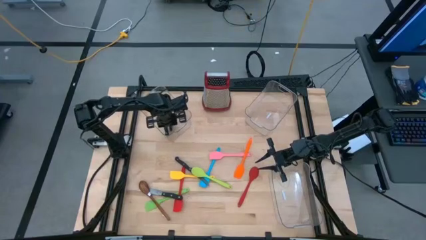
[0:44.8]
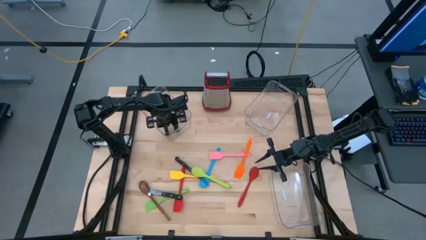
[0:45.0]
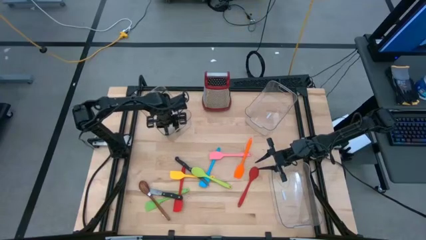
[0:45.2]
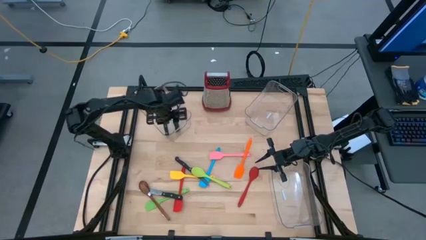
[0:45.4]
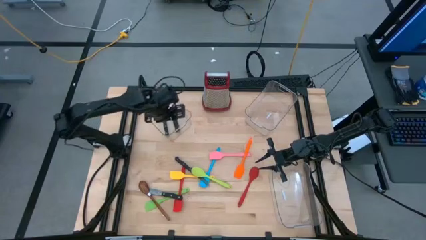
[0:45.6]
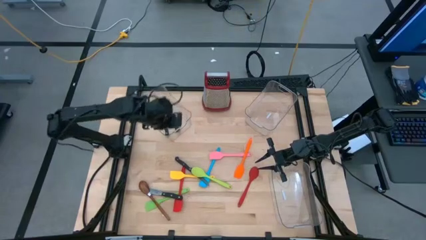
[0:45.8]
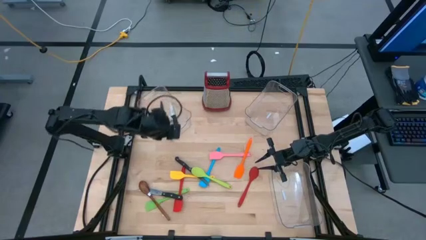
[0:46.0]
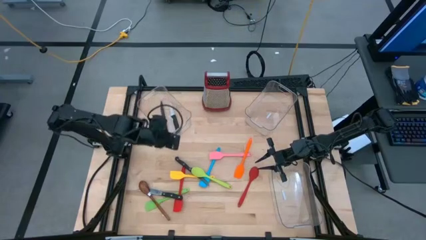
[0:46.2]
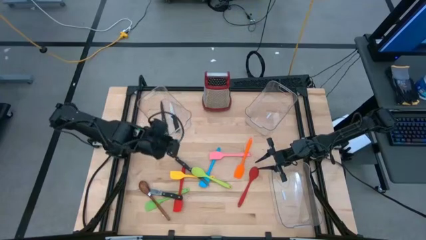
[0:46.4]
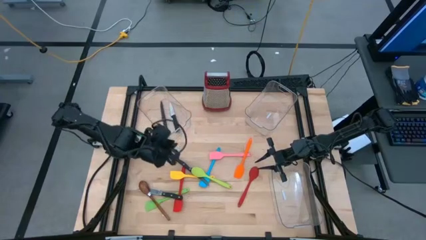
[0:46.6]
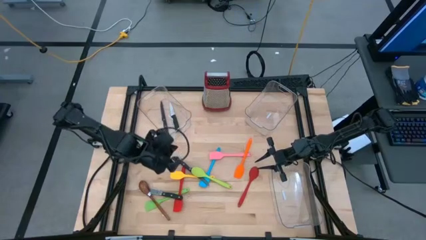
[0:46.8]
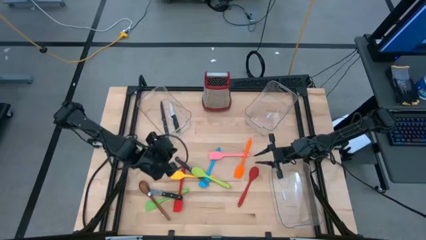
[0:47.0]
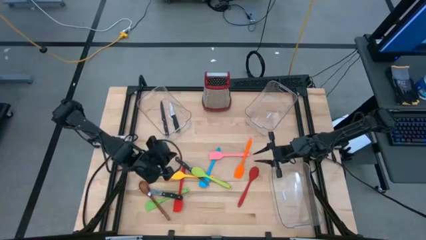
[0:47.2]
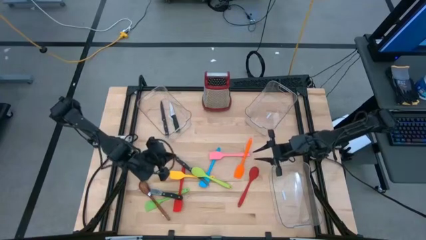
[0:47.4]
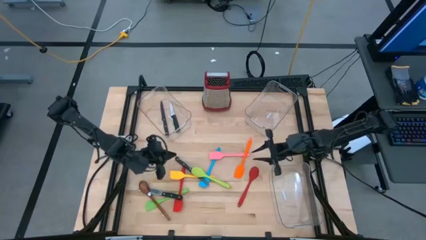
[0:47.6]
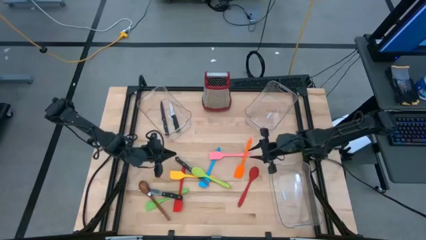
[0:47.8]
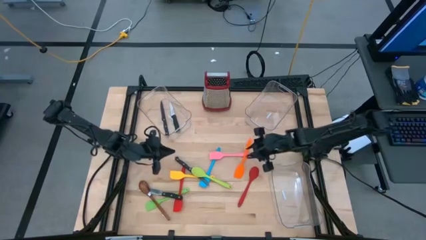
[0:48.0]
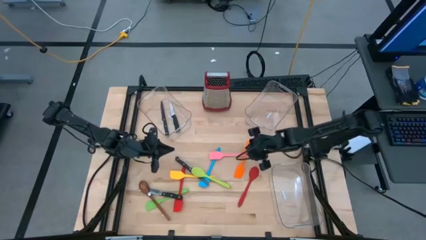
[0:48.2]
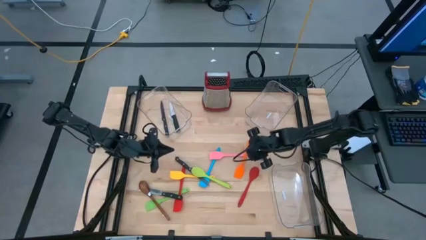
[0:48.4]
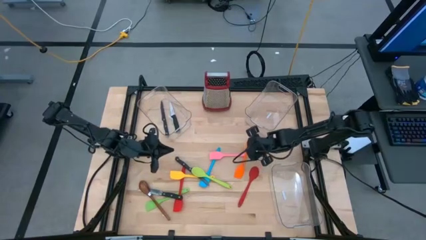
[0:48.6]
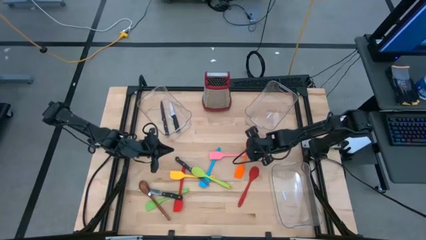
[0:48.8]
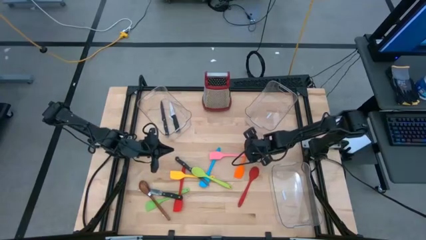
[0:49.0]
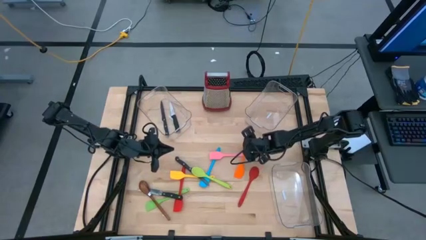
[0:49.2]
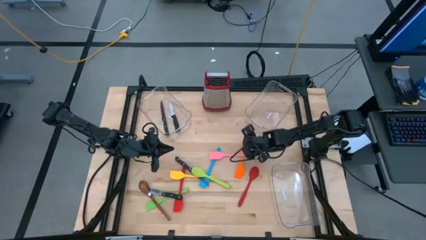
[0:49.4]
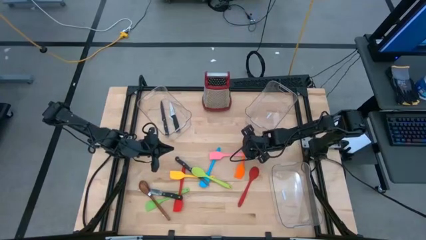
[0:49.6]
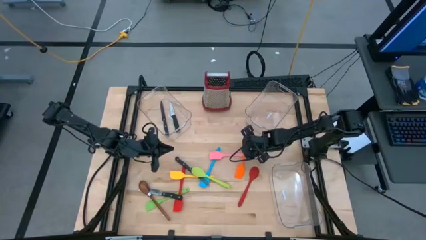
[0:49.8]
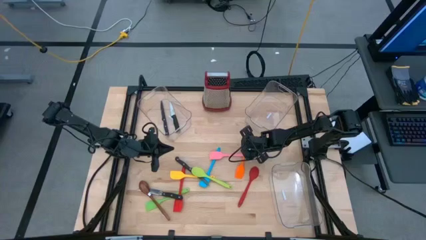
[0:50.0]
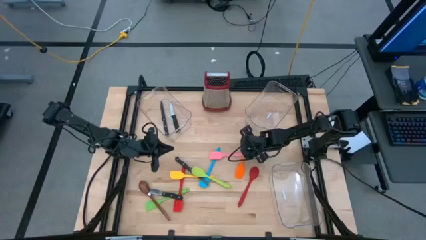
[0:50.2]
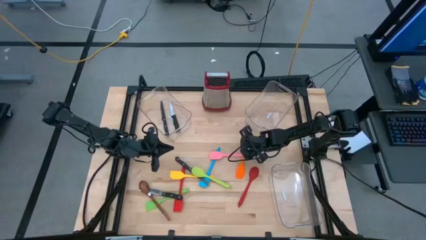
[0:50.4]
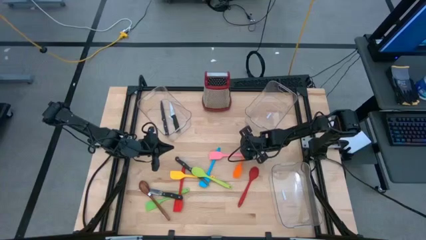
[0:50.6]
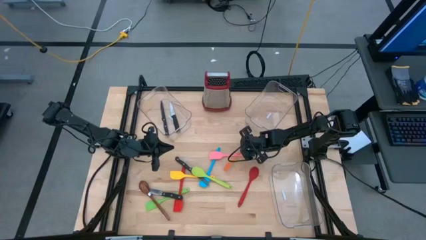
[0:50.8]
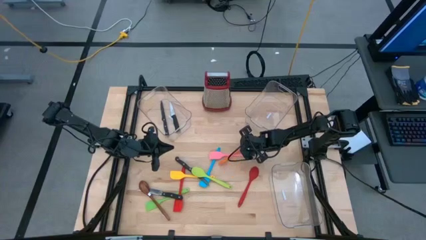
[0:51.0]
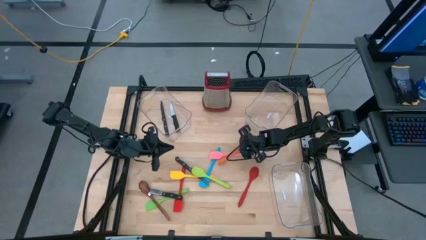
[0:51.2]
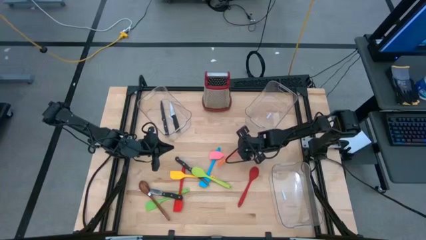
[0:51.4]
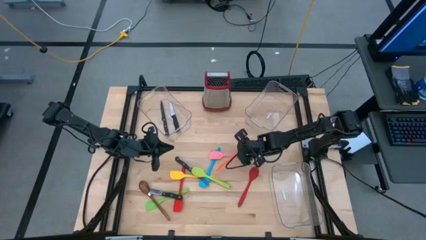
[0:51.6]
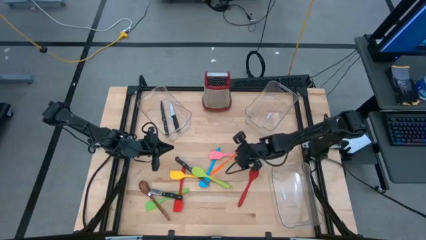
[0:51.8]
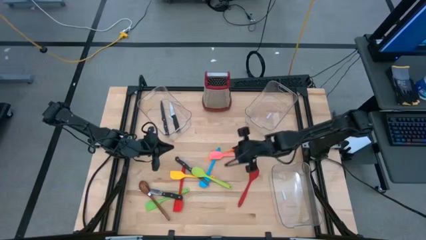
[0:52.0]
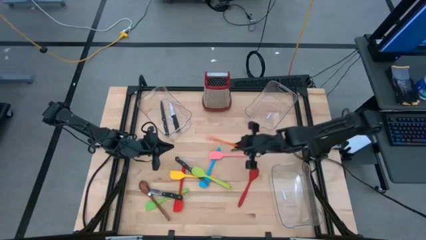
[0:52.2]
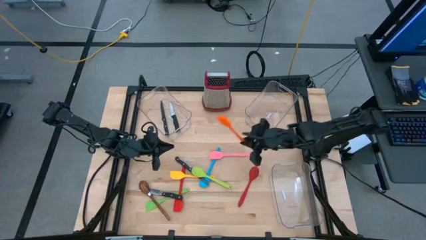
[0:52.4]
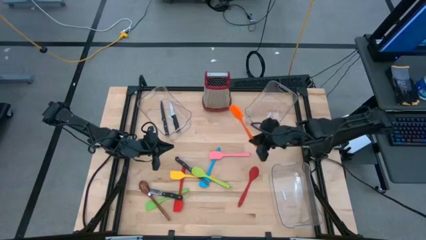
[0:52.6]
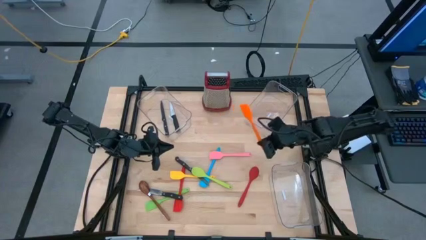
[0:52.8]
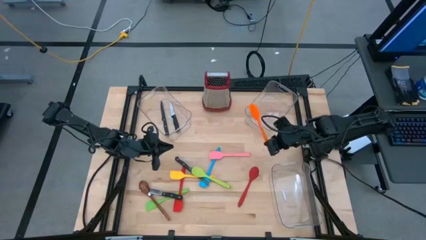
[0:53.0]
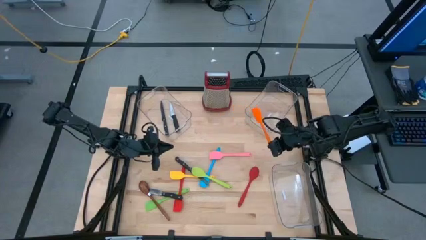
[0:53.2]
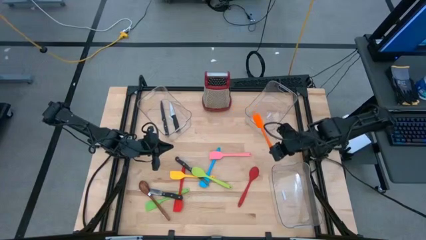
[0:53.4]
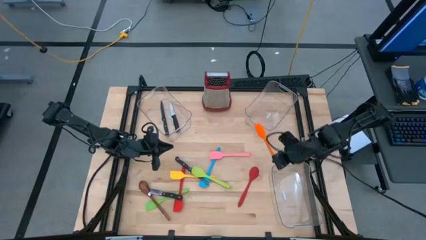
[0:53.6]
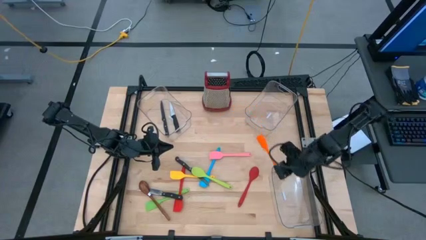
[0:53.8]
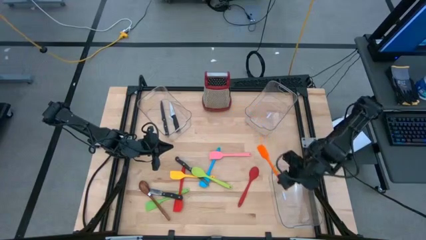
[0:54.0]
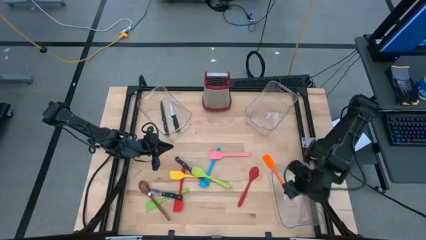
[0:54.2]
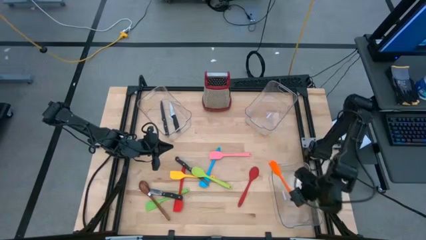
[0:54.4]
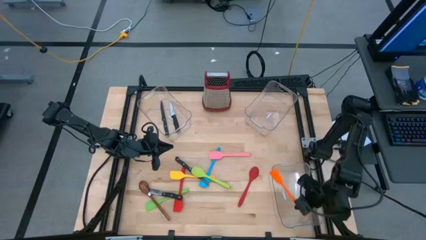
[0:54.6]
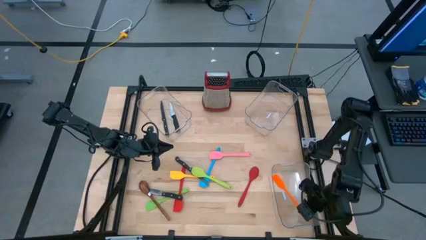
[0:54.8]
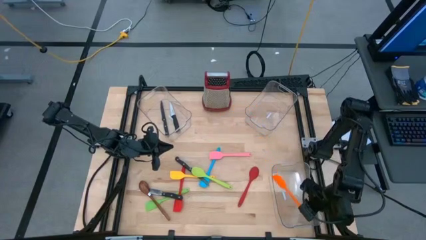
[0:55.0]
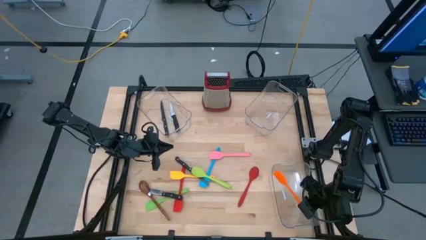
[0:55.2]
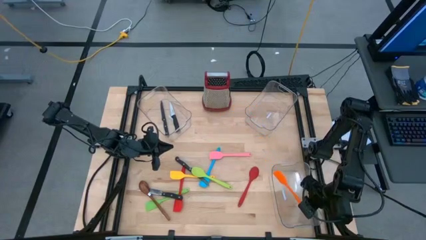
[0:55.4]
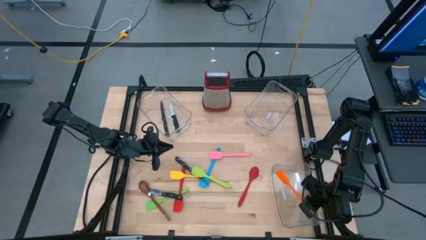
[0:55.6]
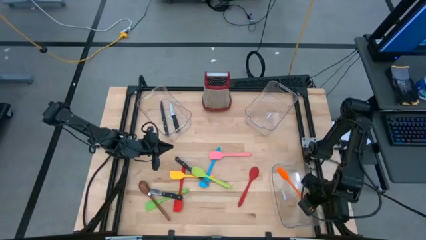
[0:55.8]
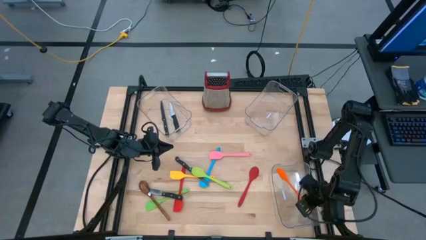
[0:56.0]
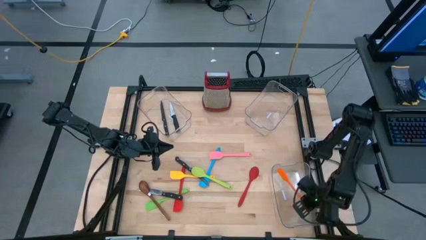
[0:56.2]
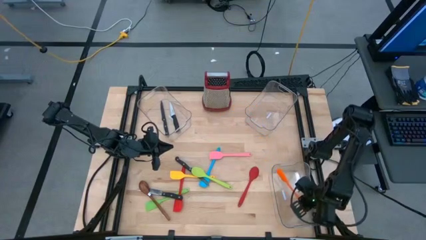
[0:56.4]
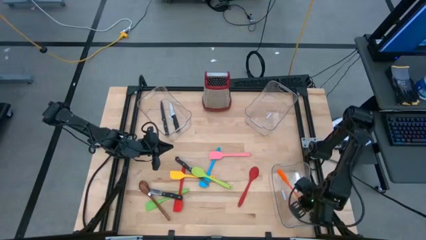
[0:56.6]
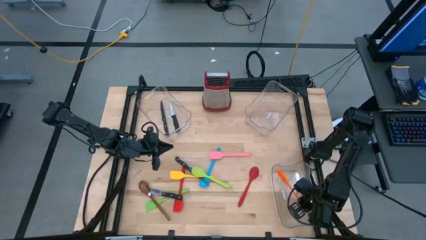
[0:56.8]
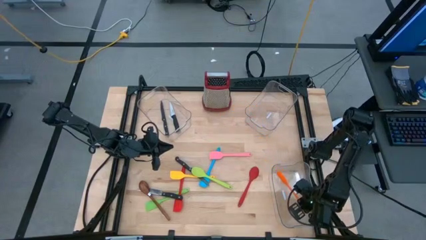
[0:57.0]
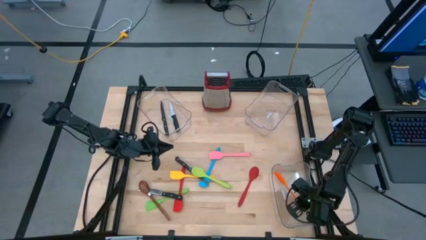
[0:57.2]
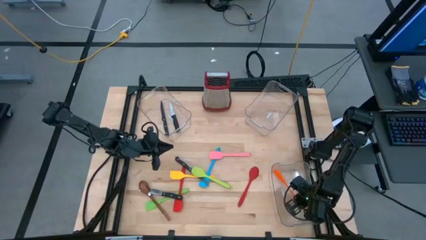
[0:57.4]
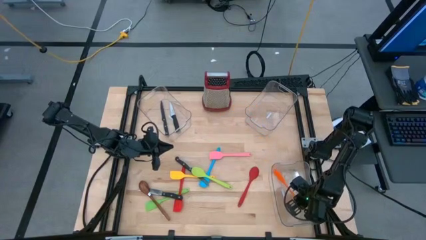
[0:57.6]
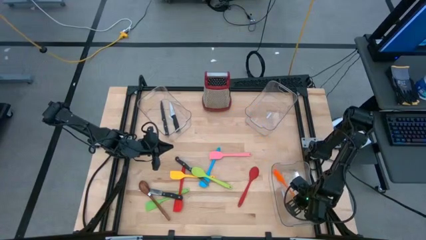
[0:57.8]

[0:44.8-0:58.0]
Task: Pick & Place Kitchen Items
Put the orange spatula into the bottom right transparent bin
